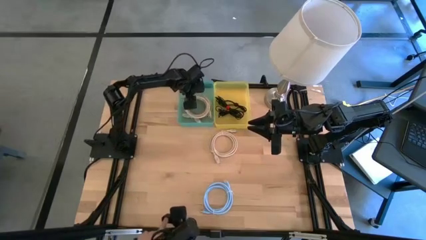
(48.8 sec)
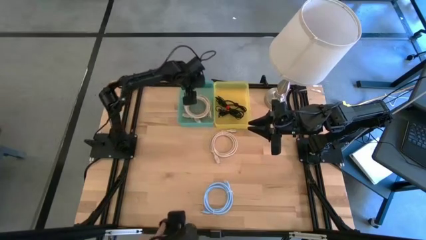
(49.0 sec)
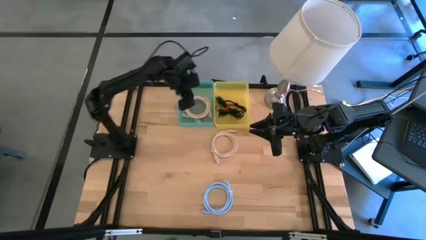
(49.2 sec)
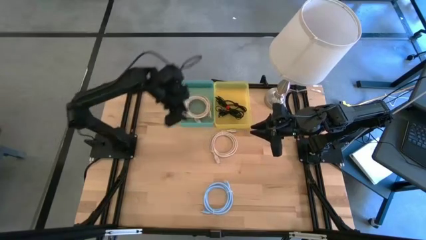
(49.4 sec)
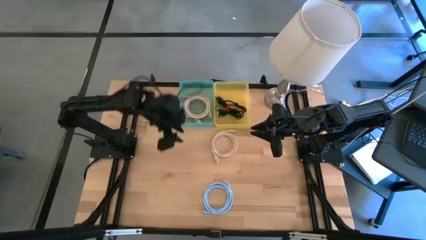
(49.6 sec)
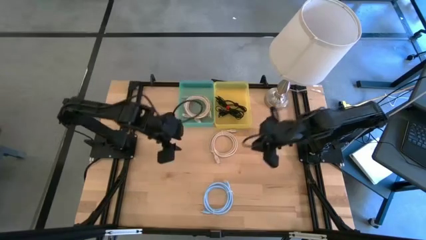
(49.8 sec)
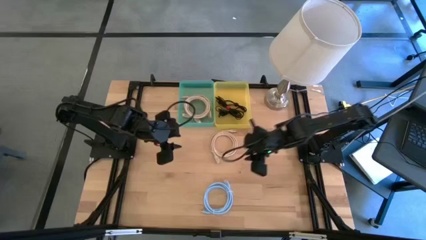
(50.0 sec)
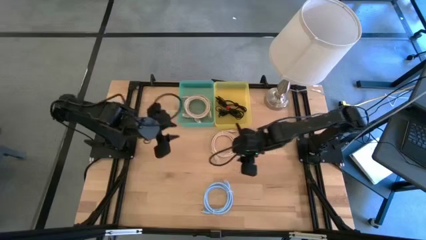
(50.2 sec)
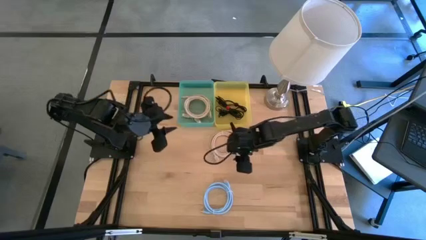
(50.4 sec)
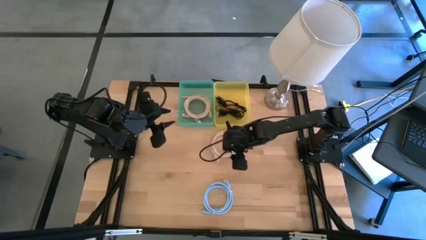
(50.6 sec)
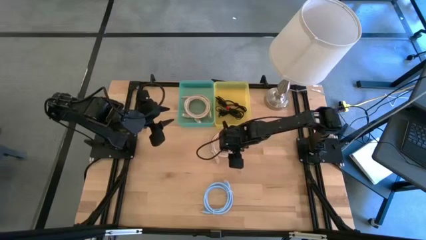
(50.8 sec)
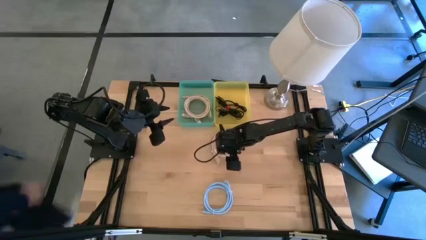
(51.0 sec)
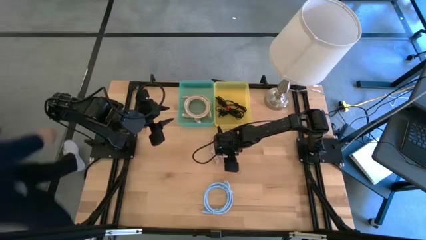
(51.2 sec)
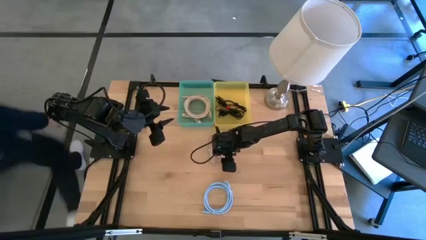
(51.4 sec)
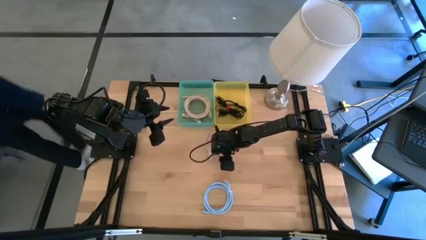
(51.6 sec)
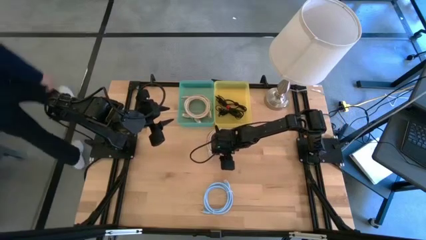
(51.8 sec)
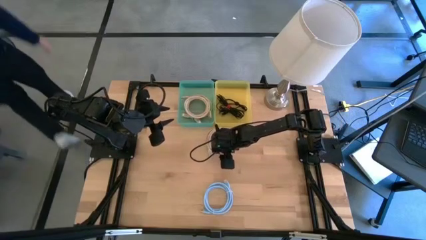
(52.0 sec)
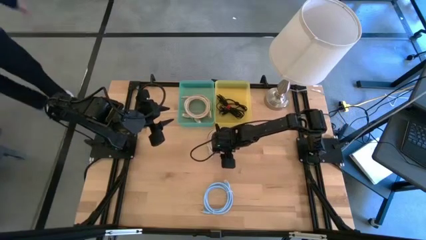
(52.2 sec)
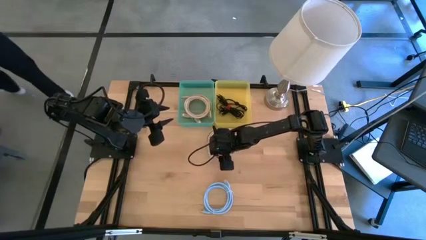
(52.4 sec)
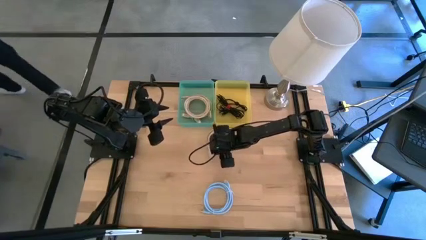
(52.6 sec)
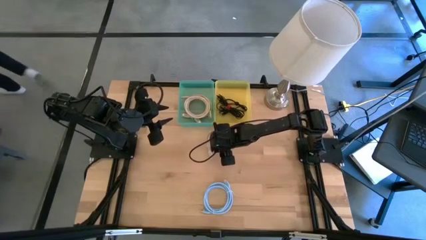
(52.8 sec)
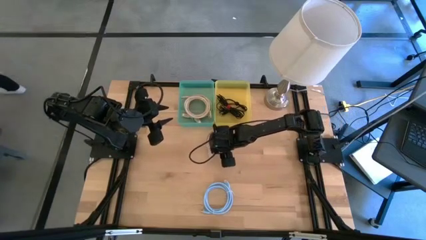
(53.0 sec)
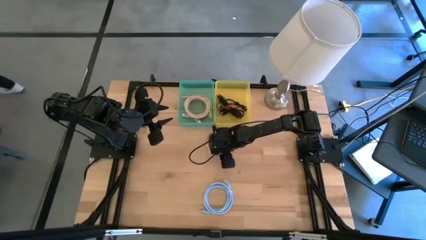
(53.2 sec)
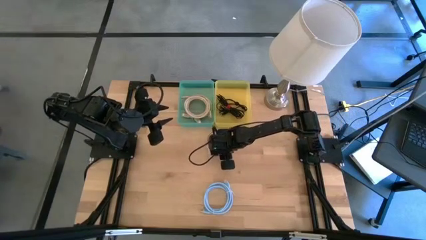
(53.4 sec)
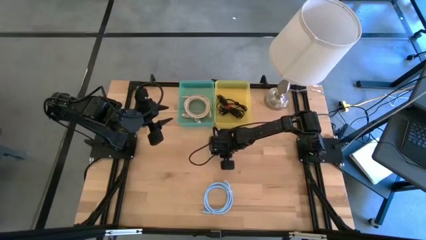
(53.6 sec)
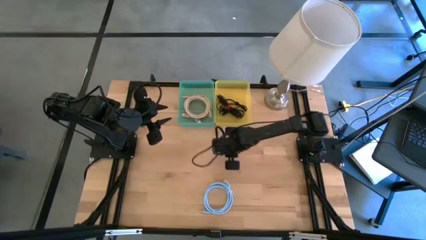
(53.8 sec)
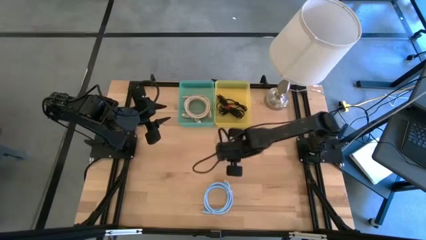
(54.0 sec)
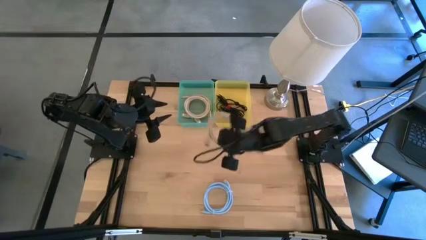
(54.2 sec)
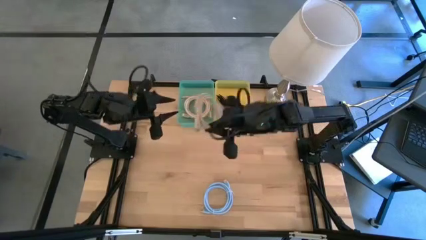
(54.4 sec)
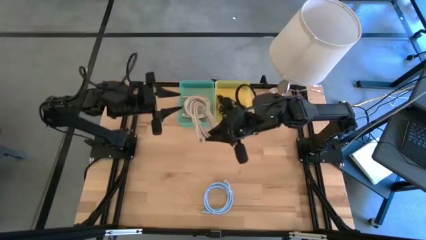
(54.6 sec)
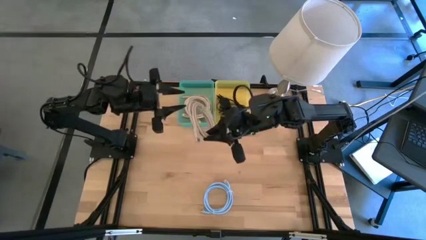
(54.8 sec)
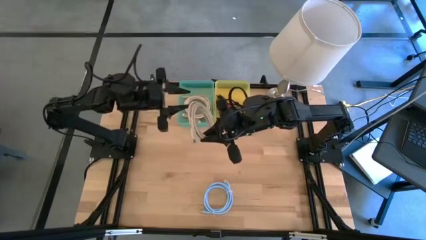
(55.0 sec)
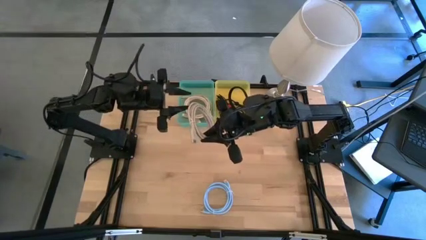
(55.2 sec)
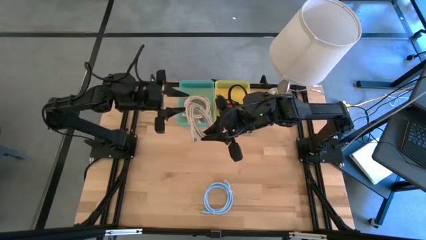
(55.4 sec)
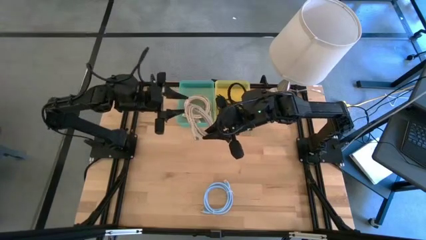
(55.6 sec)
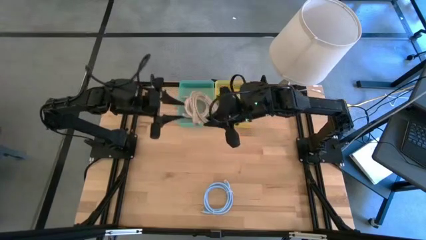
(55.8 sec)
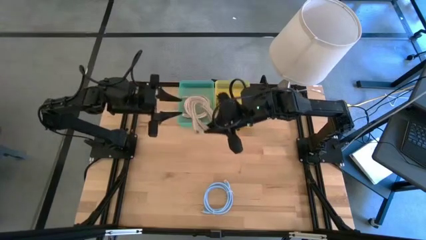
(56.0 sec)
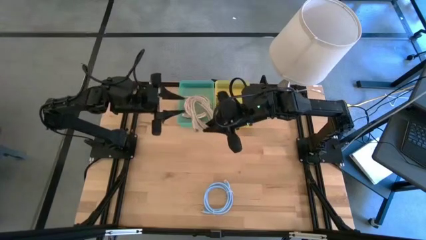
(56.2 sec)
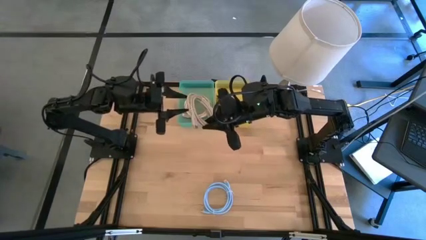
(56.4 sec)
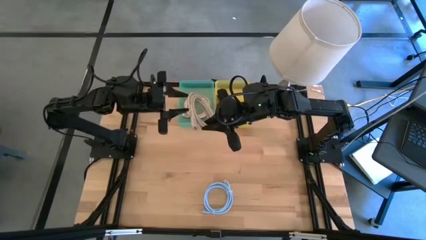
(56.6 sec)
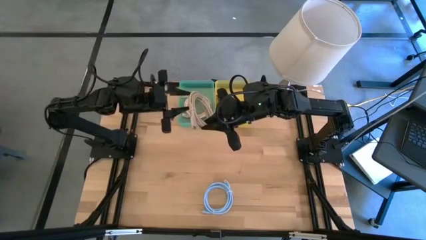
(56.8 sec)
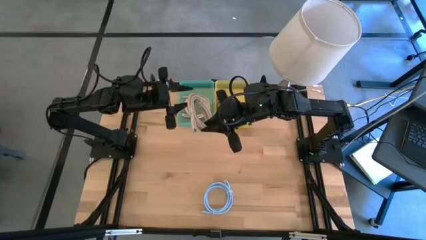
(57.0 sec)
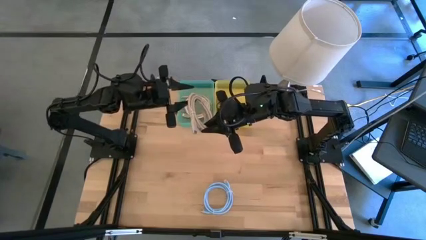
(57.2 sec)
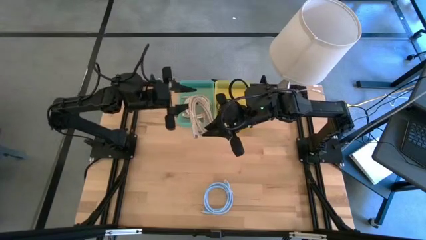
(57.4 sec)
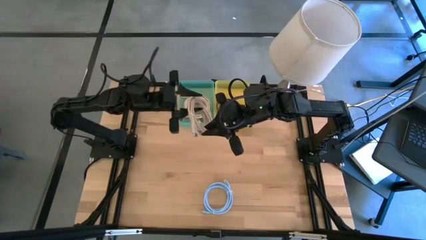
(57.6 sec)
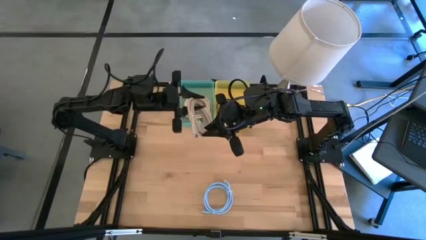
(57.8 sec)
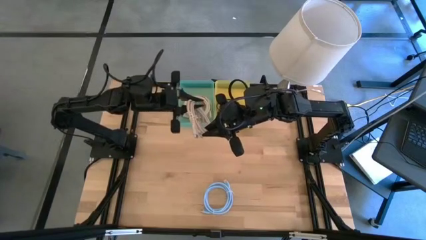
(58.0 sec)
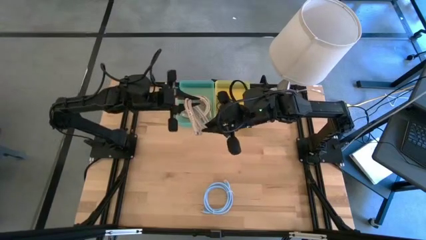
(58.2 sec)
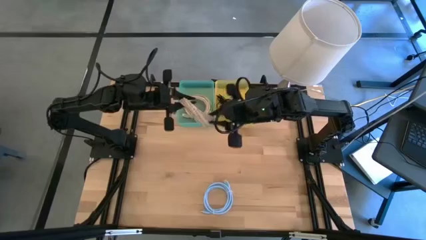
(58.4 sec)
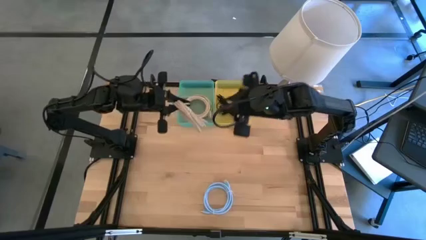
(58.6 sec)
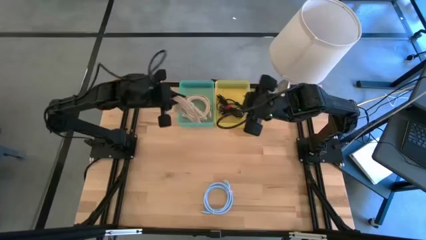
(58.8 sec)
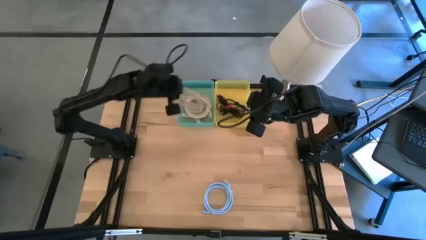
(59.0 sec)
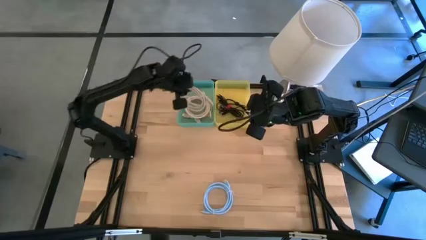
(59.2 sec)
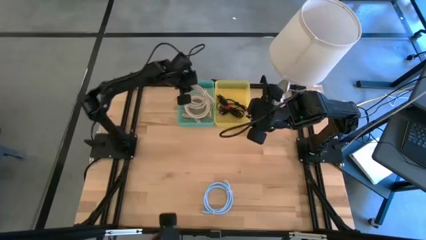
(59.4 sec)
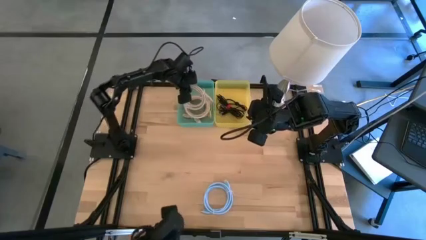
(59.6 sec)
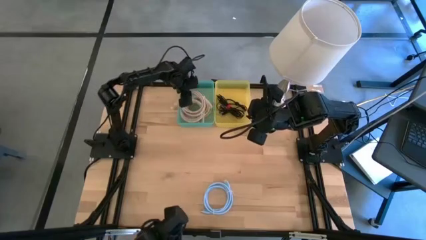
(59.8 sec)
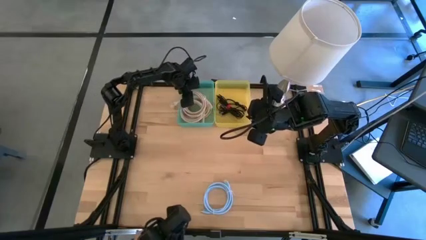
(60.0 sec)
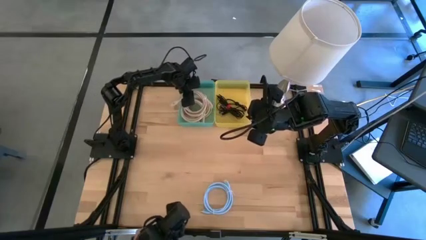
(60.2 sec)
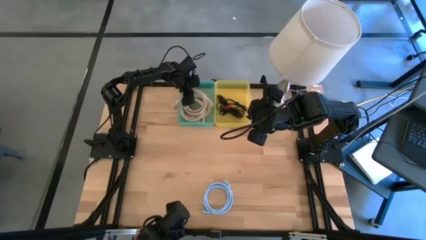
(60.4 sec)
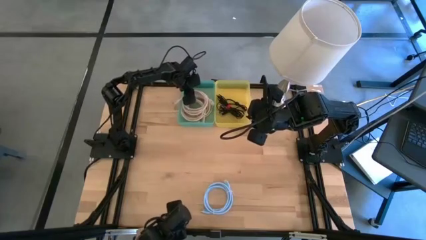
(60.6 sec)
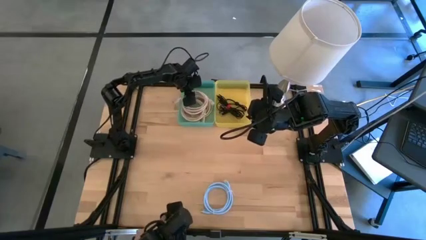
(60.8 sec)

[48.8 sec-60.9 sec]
Put the brown HDMI cable into the green bin

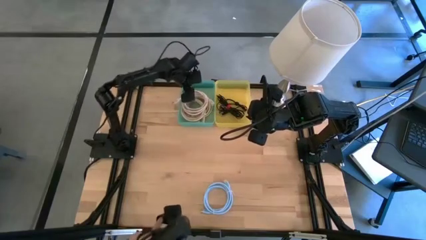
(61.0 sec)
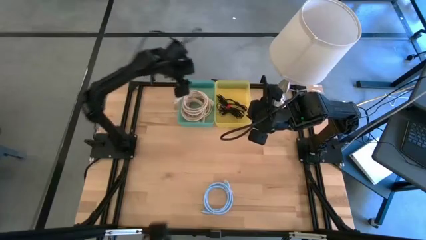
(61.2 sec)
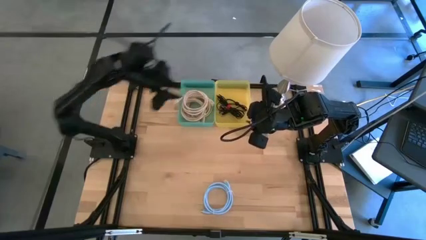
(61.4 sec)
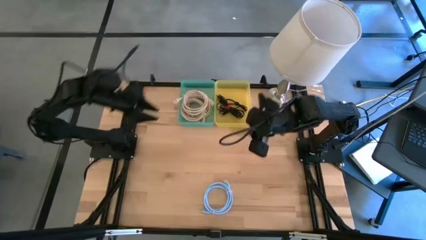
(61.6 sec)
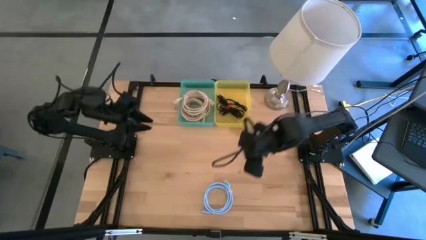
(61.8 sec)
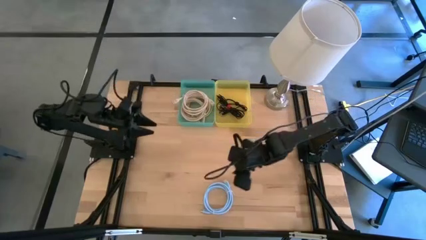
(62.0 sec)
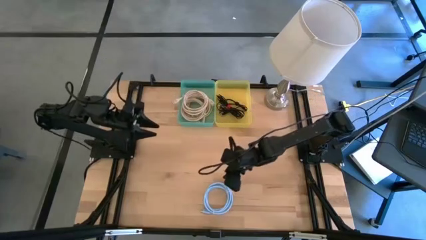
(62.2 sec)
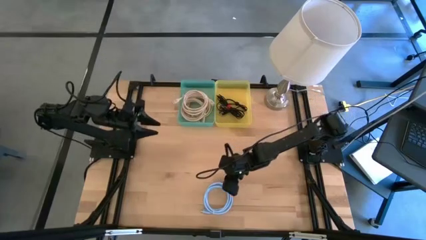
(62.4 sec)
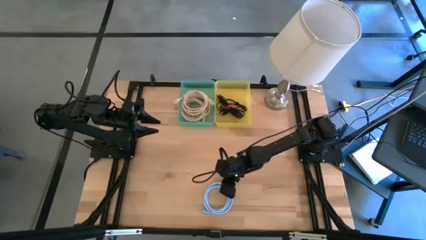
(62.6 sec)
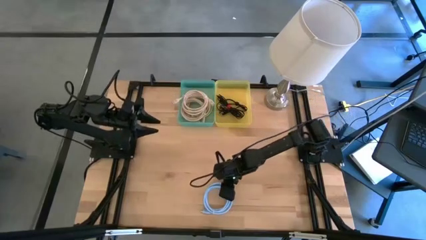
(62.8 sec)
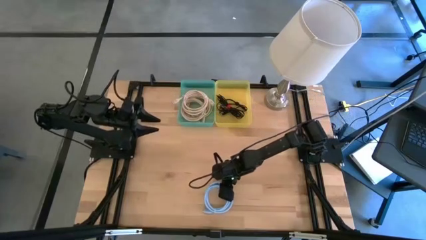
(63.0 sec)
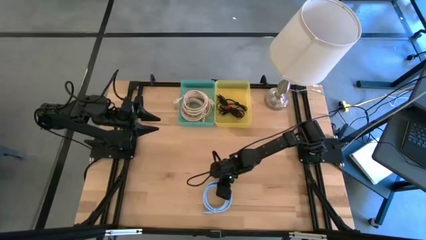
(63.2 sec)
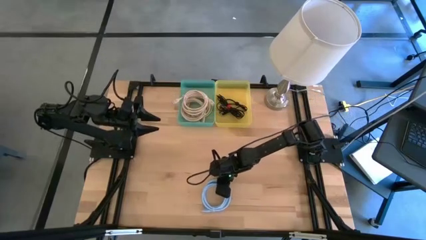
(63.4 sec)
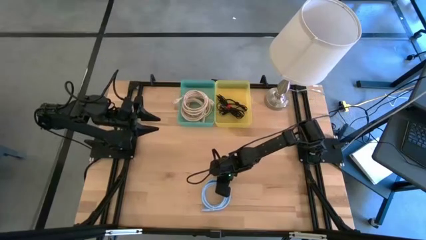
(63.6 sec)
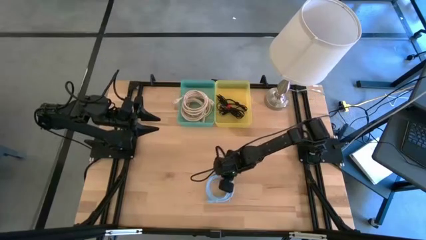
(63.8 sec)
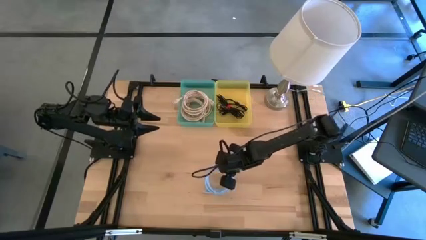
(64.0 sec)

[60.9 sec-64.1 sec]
Put the blue HDMI cable into the green bin
